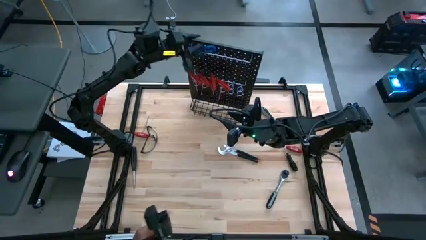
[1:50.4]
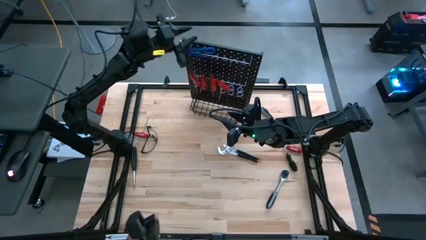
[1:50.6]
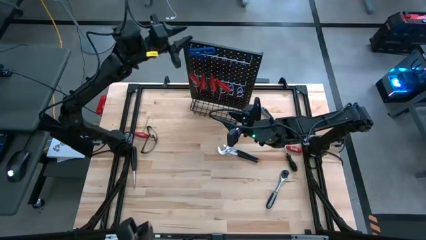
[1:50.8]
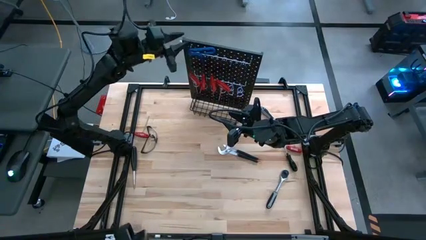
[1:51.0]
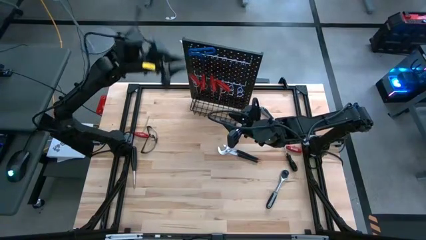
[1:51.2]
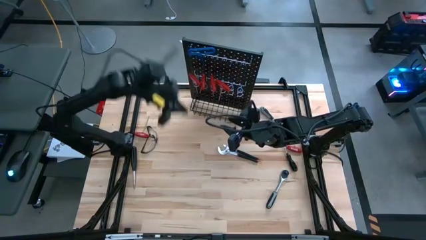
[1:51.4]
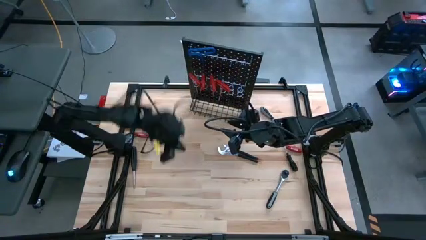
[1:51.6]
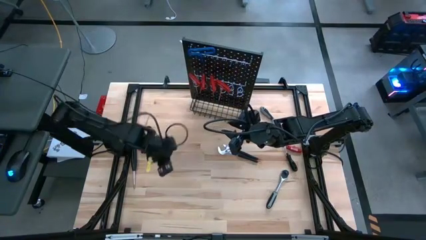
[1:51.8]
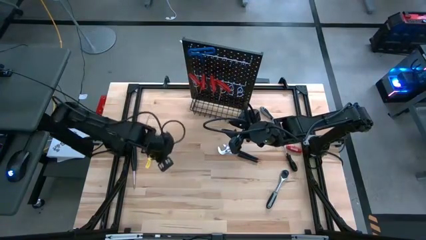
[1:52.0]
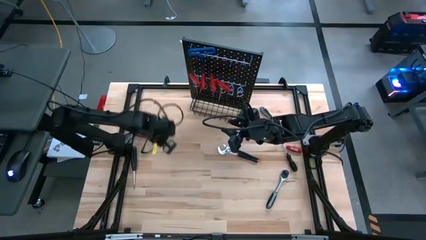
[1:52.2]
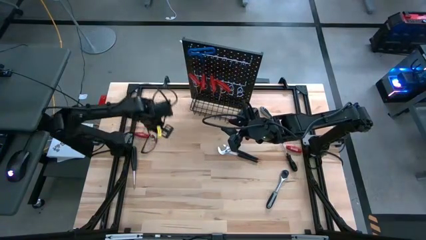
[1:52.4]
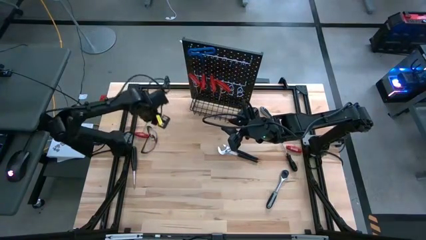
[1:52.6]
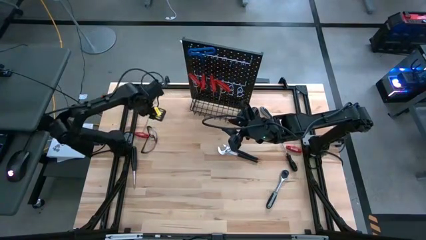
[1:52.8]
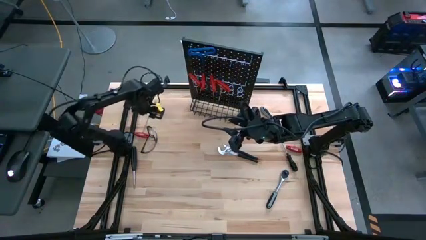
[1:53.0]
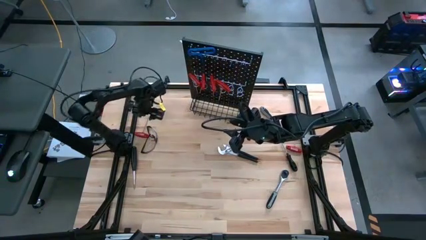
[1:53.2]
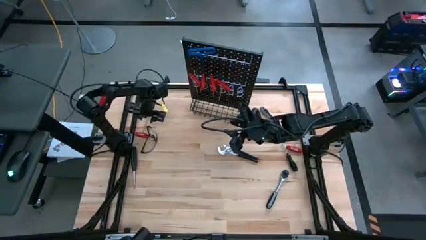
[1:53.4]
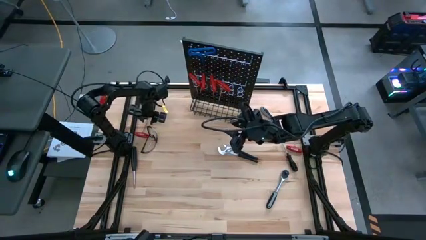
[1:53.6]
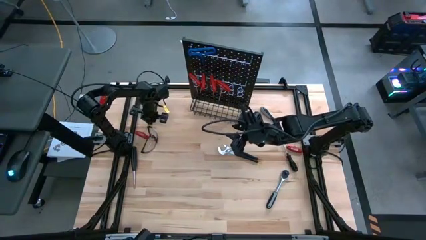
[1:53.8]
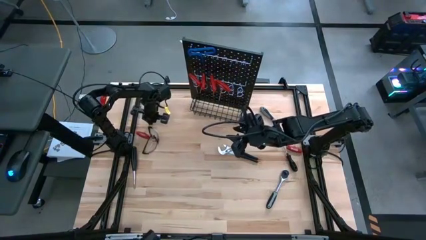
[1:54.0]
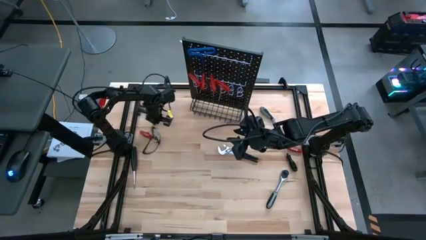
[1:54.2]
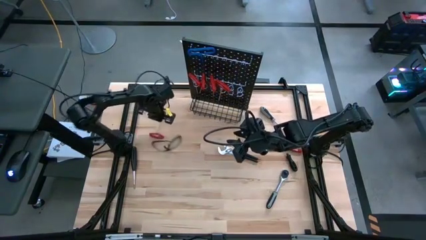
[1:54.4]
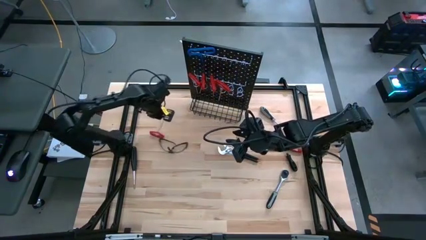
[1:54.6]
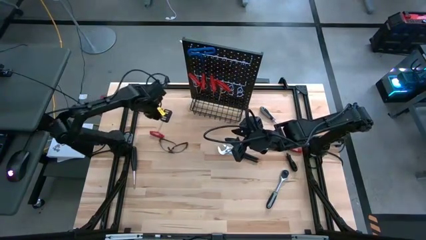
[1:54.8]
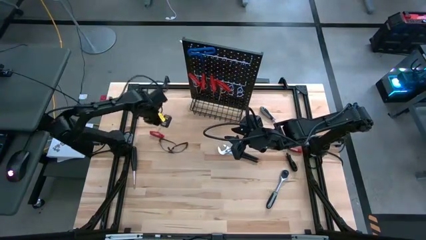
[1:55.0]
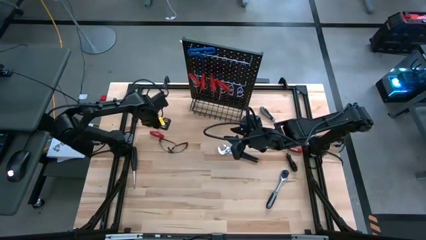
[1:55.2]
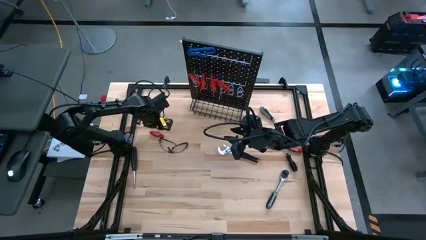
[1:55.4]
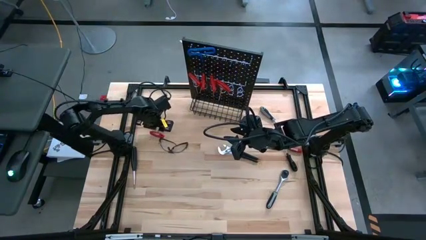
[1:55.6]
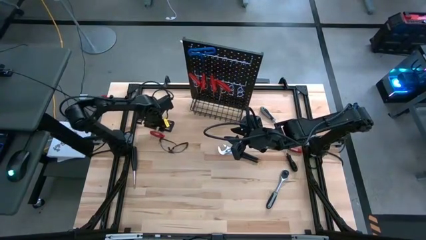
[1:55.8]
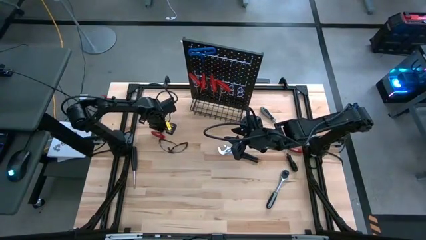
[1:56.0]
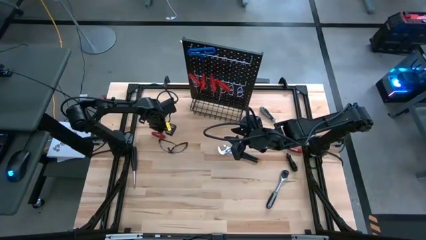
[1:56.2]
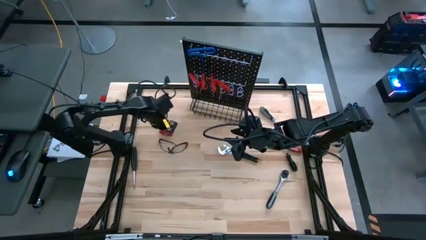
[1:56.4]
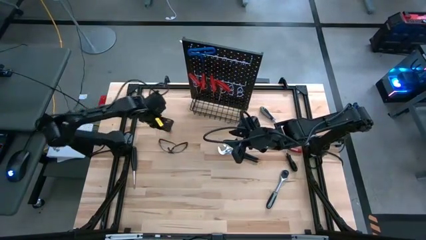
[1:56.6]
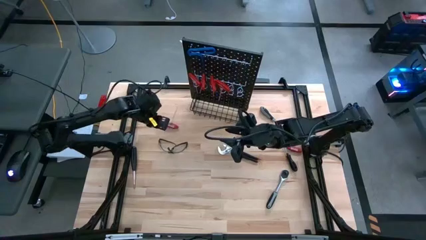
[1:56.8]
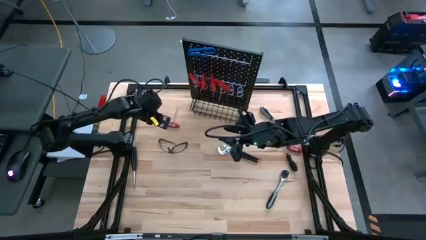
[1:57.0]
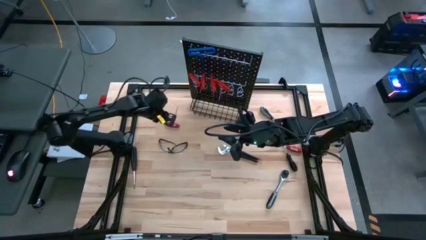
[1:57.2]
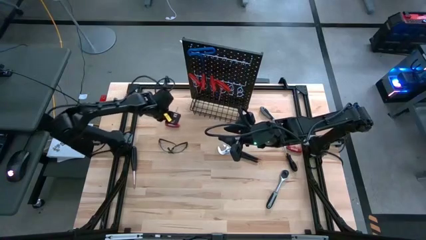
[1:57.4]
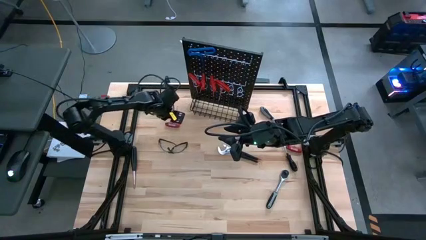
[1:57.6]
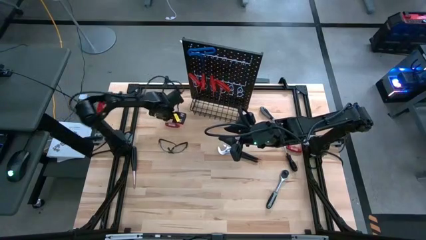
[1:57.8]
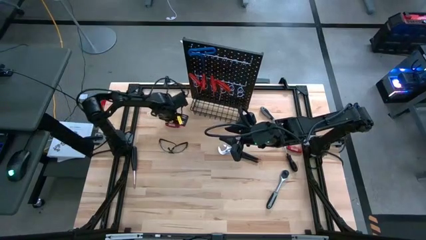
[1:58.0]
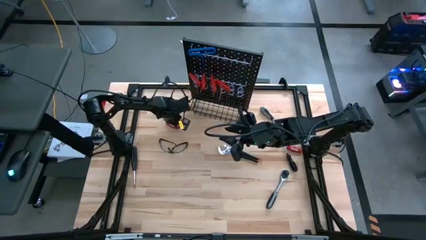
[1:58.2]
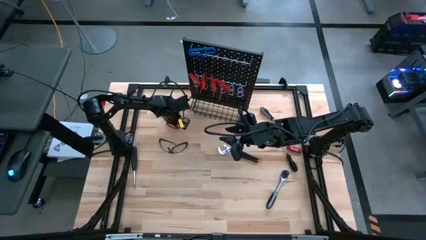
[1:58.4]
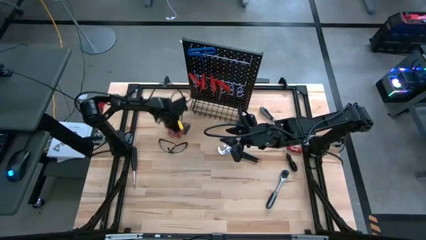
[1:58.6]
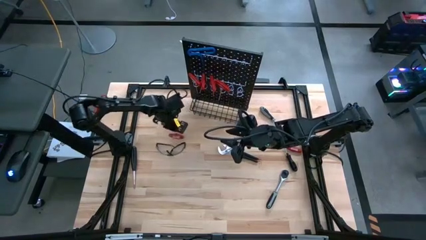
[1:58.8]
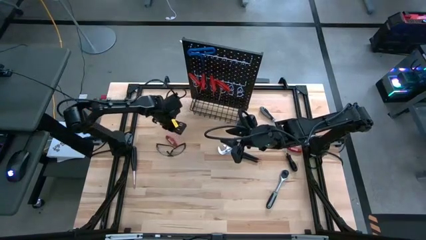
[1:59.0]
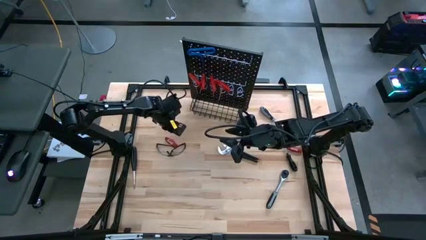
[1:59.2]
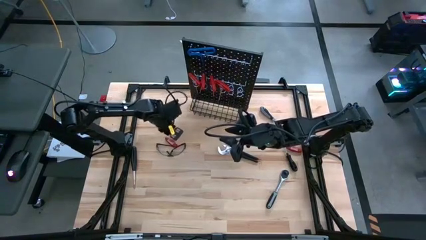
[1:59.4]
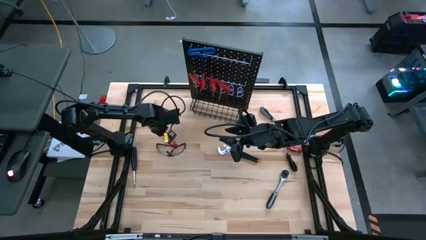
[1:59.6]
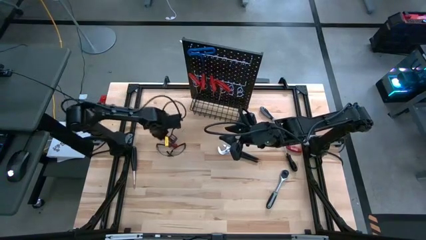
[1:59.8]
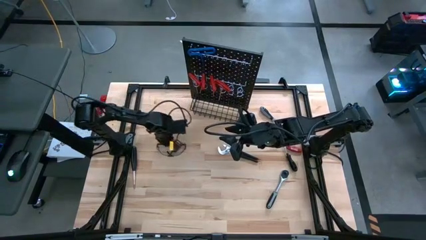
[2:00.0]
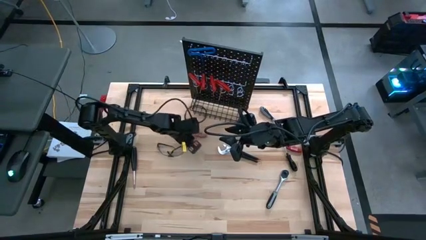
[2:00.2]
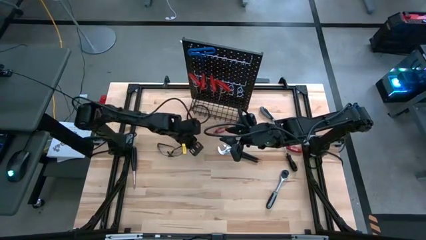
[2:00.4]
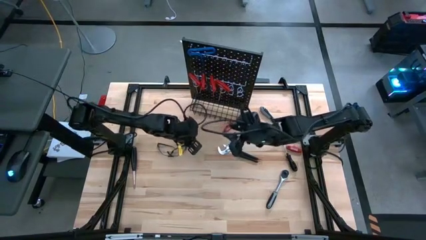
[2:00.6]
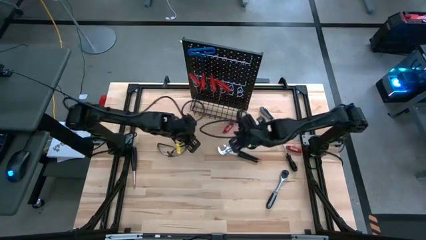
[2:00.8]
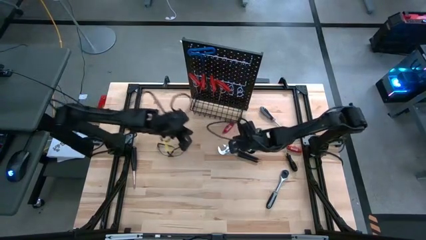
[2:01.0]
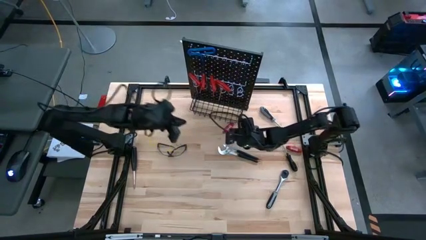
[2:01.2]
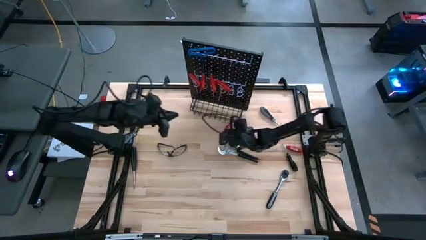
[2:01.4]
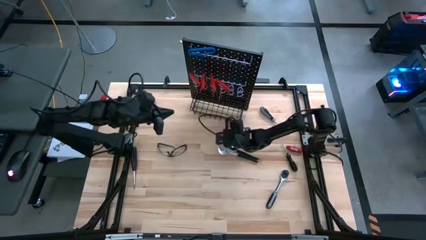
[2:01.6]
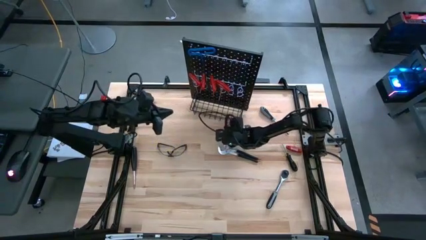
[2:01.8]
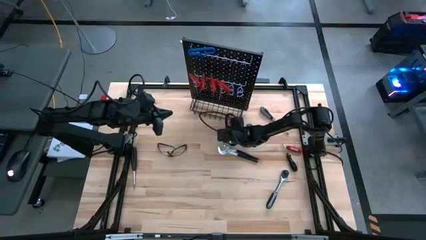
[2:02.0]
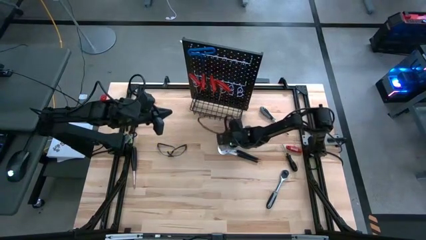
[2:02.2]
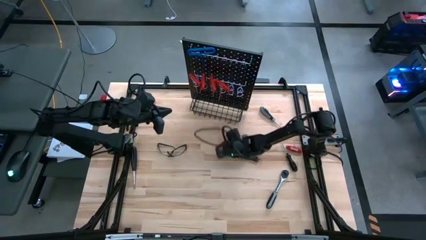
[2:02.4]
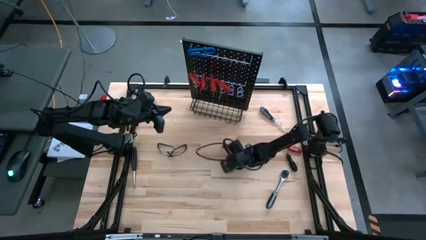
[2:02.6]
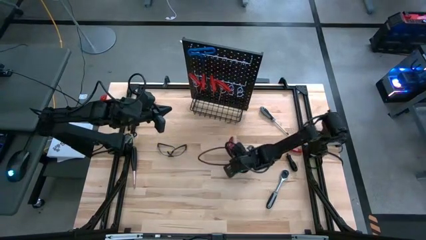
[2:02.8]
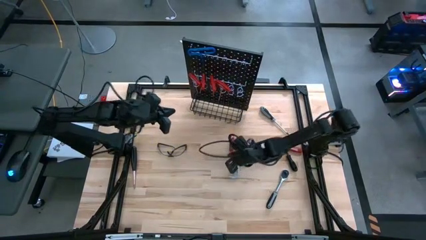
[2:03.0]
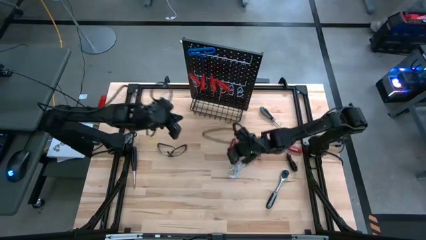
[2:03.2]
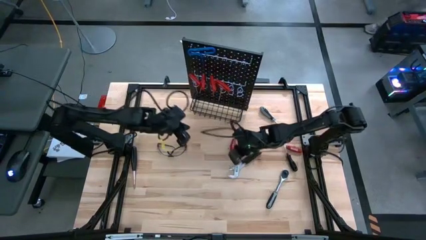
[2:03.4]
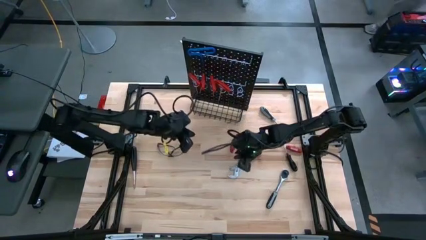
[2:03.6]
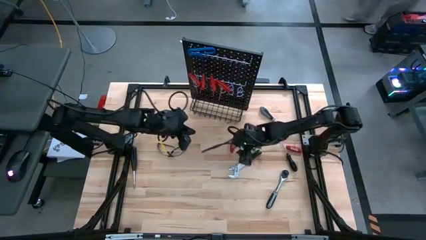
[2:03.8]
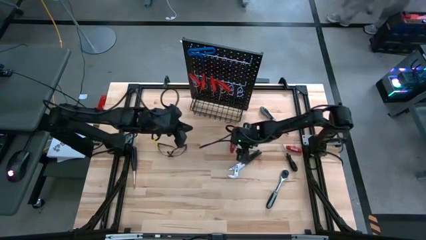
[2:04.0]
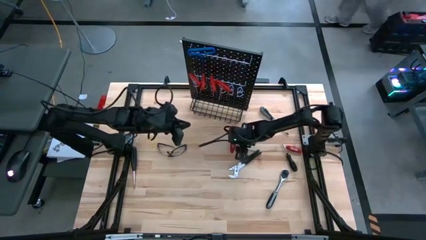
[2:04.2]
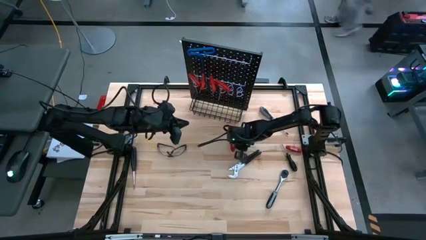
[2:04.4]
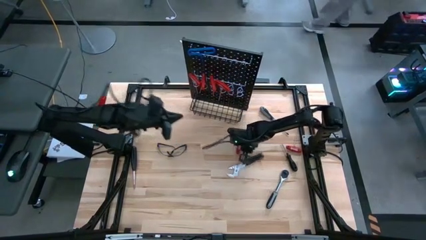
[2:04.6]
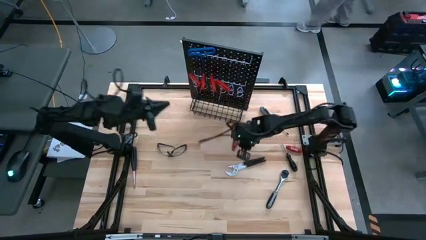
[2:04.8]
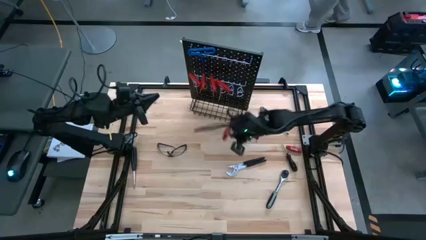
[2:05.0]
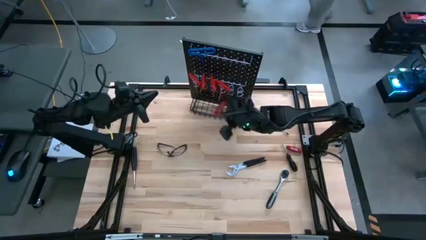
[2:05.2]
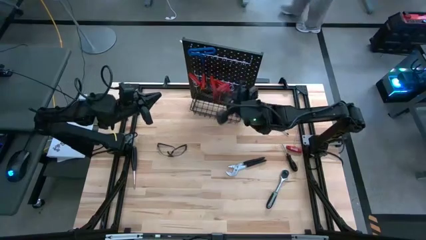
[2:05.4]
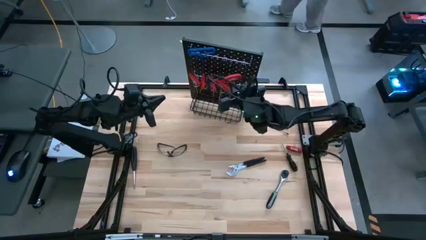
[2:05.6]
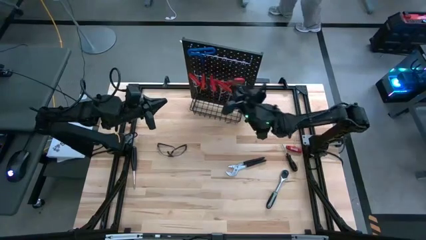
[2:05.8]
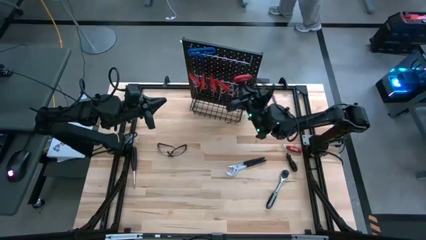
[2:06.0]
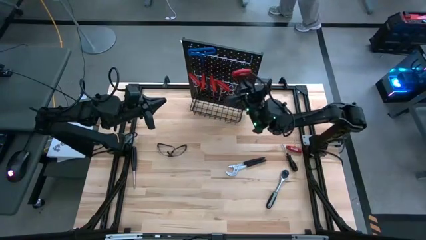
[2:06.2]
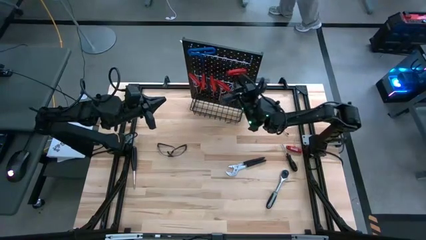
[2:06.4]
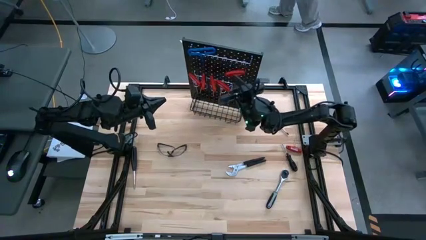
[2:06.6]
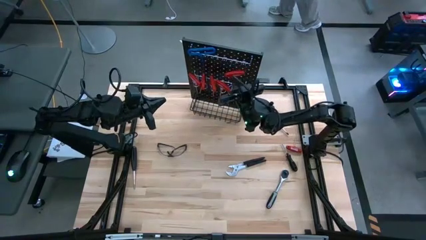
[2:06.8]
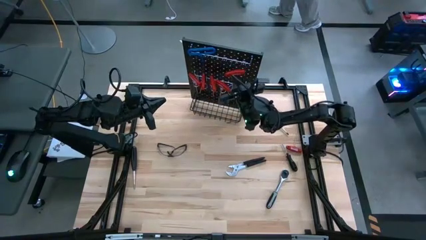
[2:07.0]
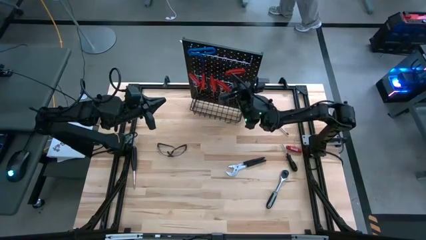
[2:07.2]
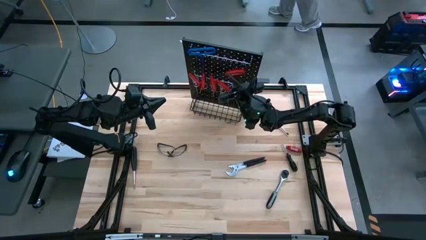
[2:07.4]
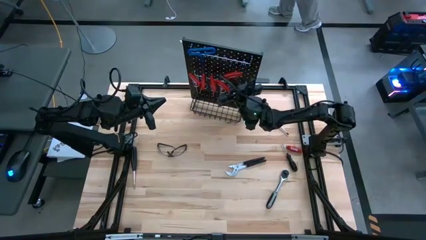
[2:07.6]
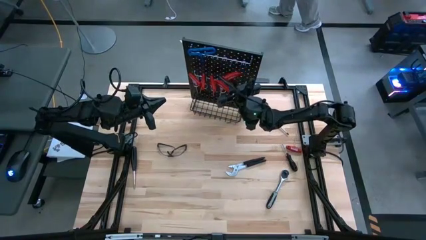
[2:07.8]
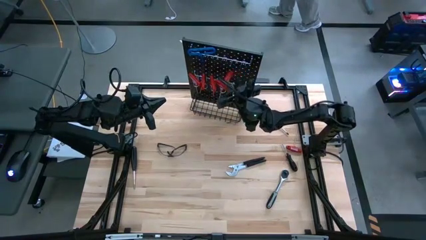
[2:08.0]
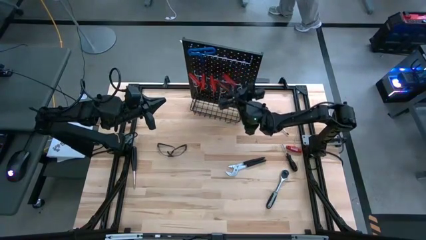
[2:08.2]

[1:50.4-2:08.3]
Task: Hang tools onto peg board
Hang the left red allen wrench on the pegboard
